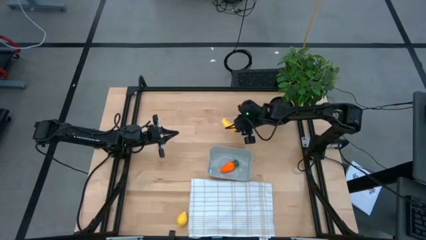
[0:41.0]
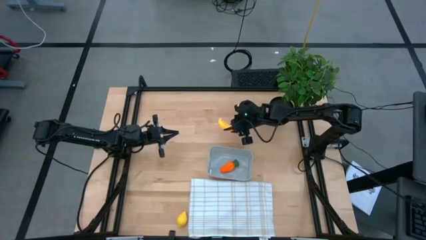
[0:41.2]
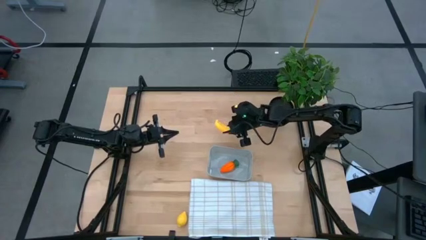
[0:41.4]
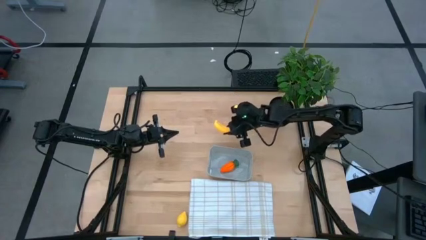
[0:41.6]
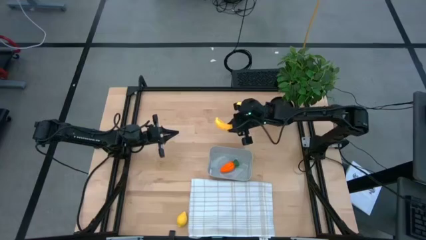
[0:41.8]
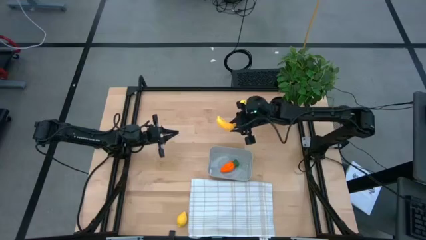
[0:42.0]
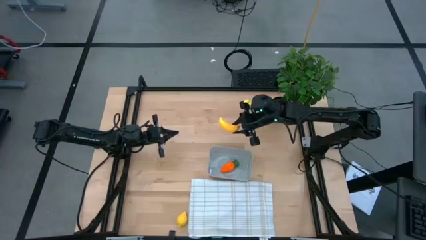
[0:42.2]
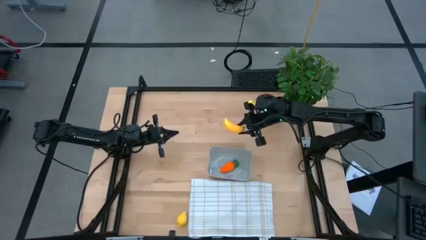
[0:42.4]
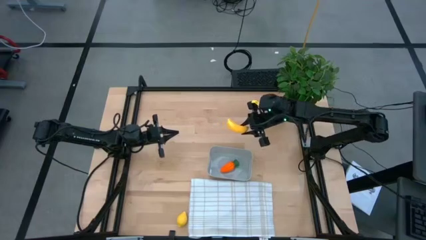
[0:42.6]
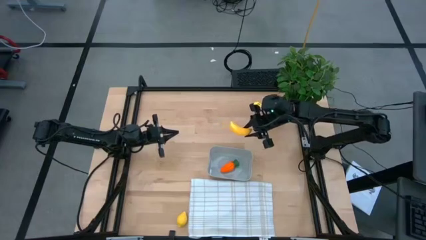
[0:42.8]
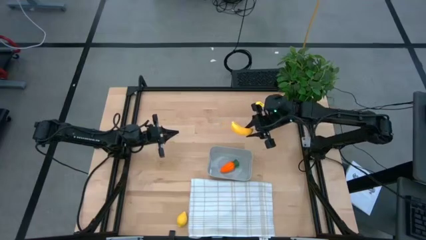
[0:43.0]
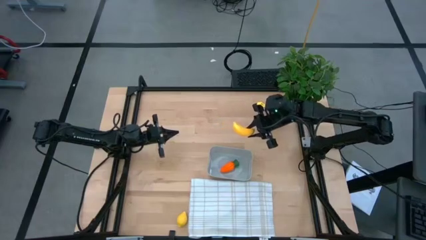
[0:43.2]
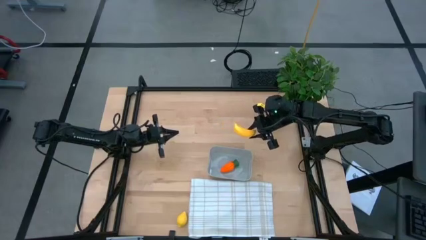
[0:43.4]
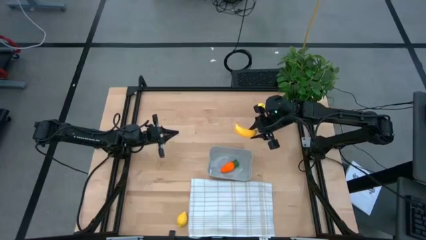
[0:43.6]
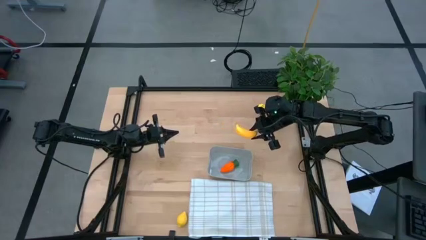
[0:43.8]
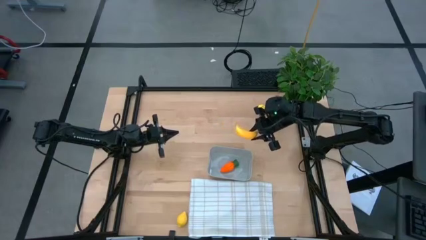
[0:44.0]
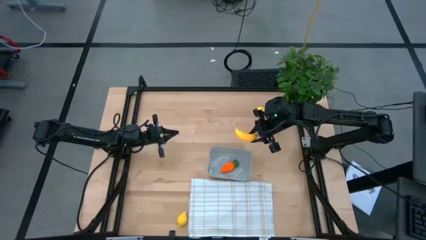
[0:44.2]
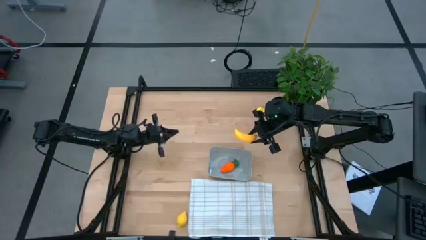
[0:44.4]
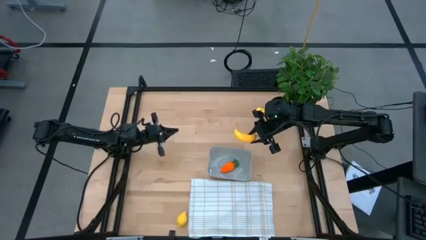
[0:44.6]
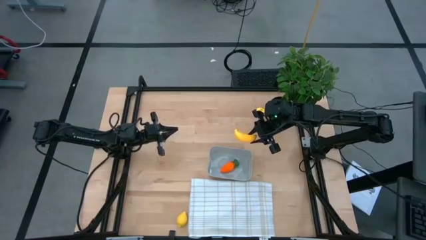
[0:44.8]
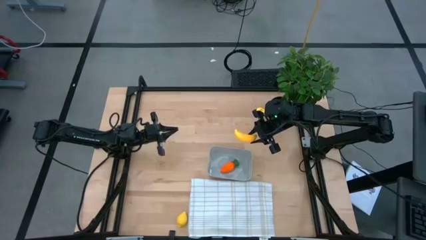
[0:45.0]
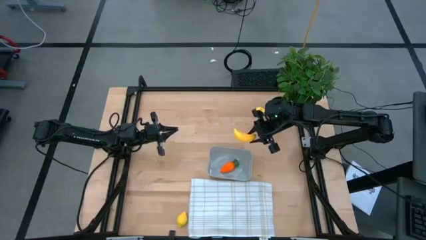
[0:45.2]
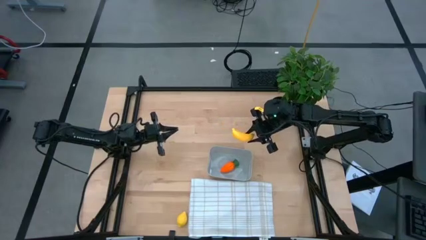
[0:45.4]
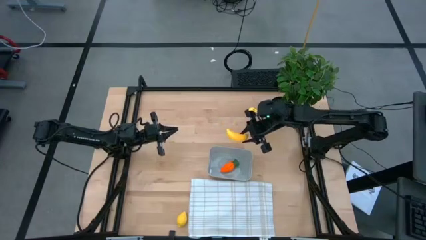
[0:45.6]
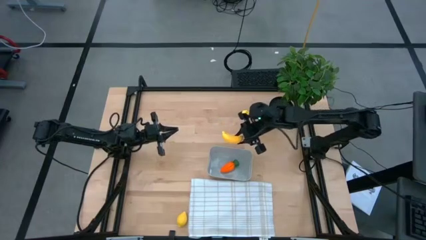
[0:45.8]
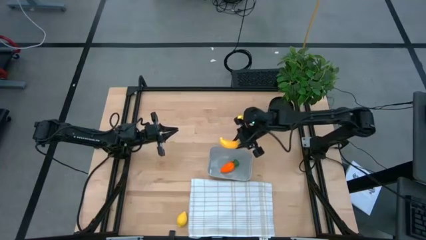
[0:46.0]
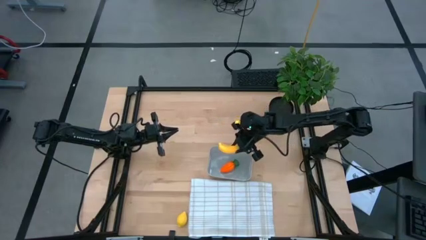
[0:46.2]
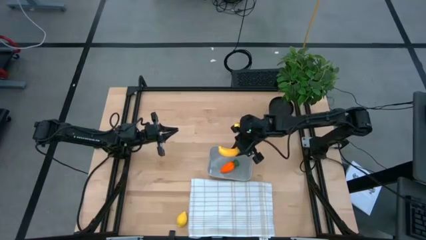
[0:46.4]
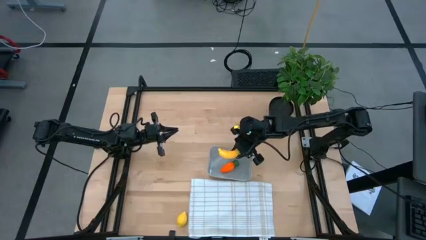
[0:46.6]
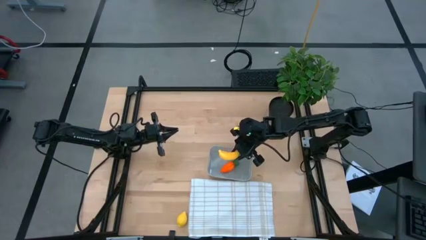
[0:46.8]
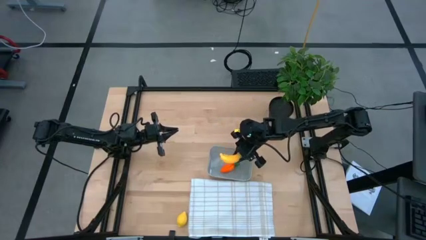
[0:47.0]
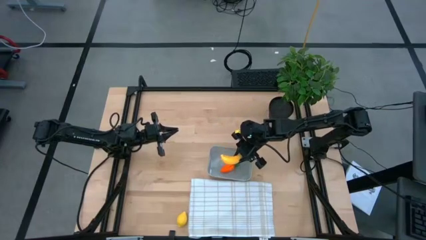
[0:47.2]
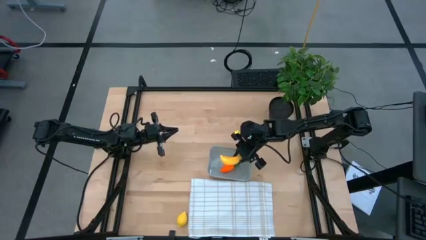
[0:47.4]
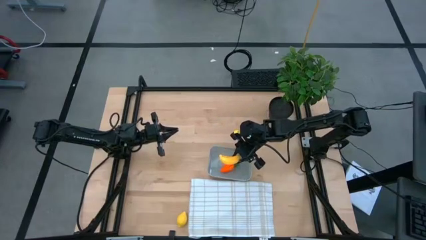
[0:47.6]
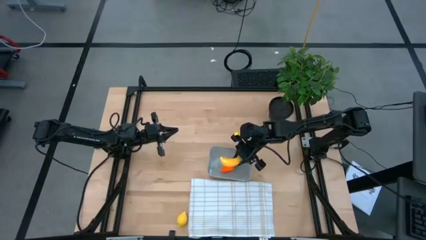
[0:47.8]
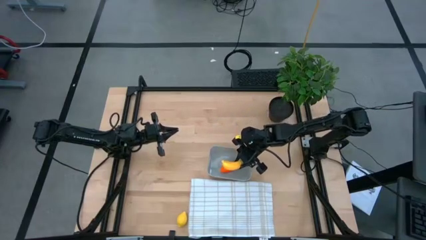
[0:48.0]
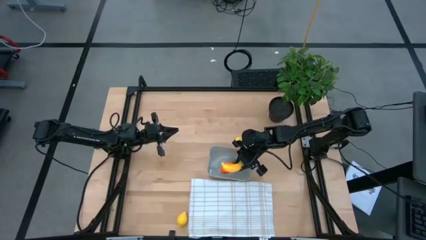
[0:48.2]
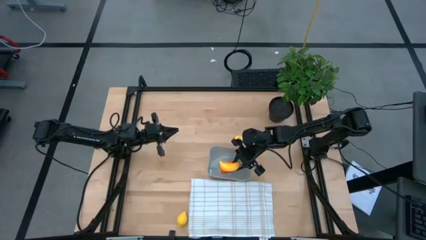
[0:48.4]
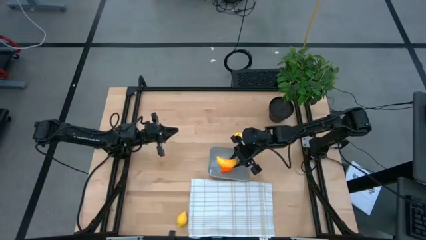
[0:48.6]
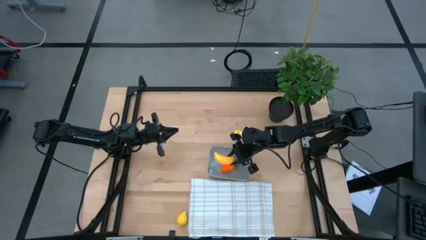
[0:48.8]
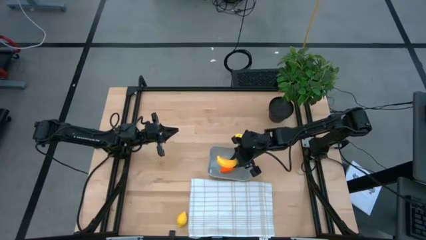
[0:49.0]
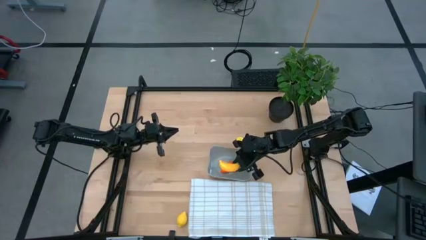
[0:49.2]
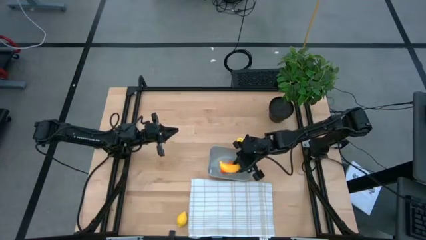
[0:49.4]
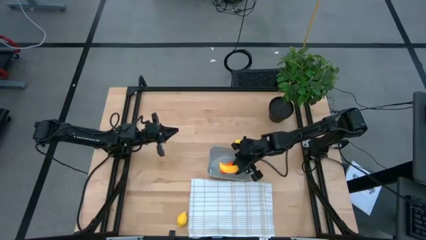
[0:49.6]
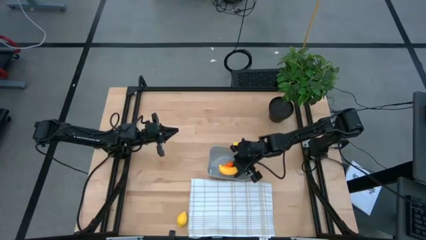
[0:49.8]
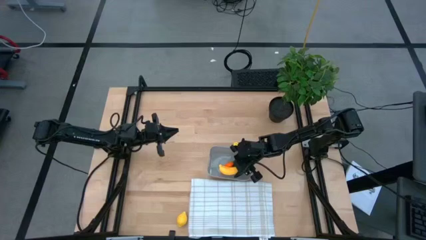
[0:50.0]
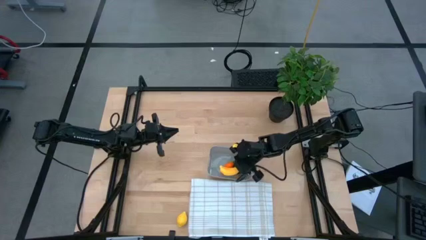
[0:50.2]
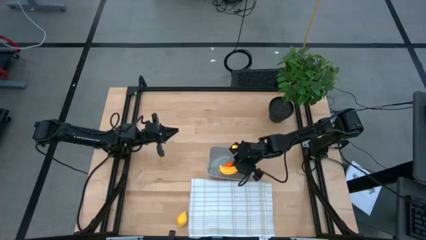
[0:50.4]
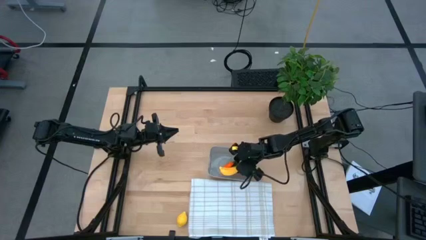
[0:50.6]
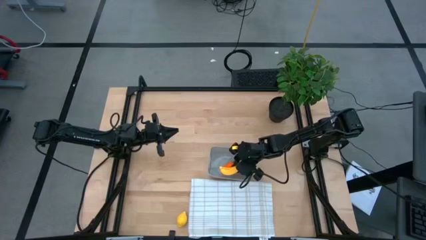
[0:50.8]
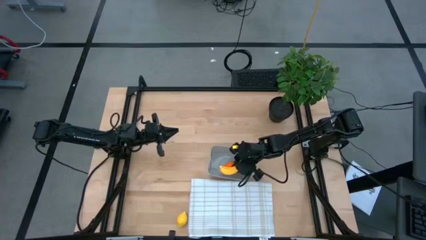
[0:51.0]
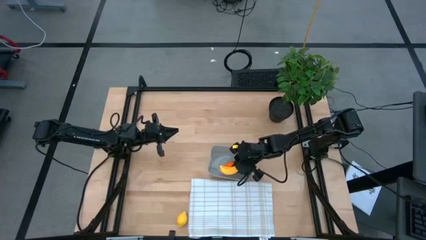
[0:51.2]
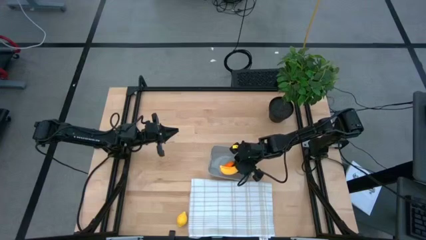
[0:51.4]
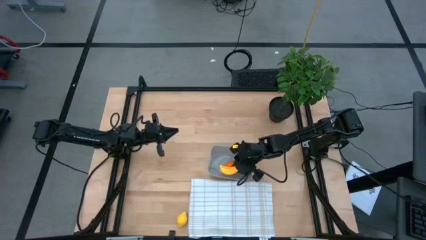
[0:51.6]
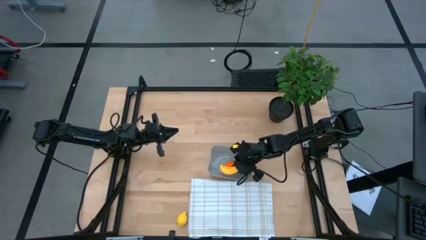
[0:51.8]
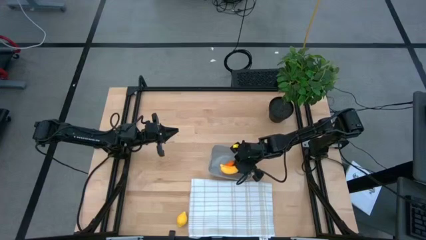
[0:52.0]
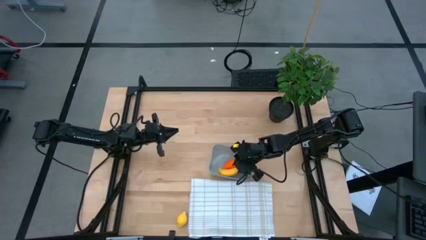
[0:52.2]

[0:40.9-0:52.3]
Task: Pick and placing Produce into tupperware
Put the yellow banana into the gray bin
